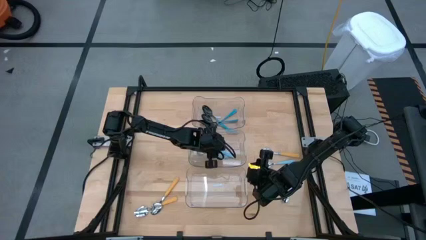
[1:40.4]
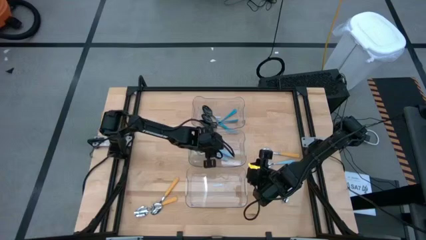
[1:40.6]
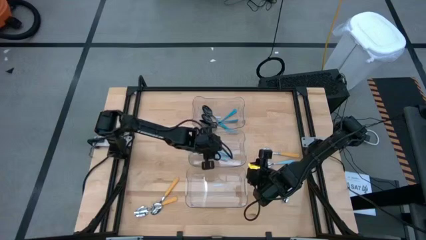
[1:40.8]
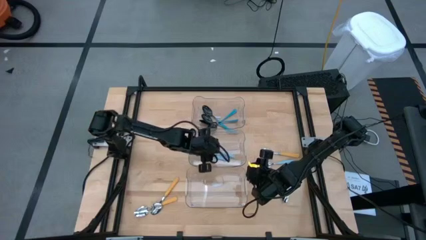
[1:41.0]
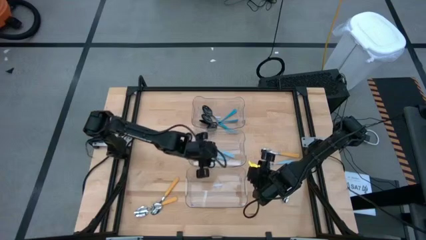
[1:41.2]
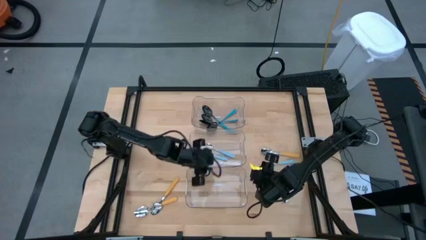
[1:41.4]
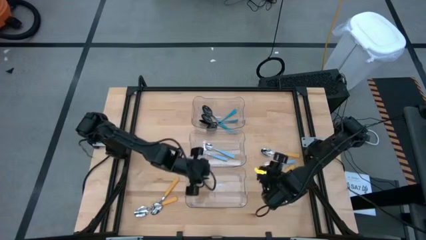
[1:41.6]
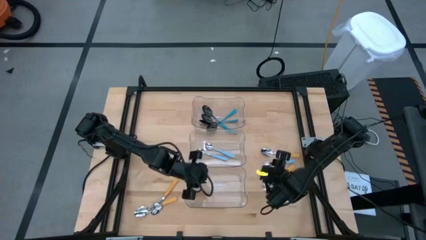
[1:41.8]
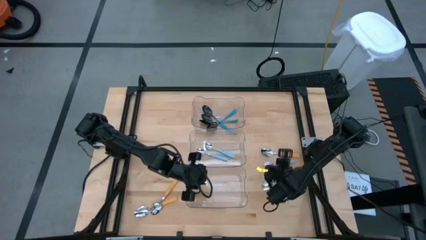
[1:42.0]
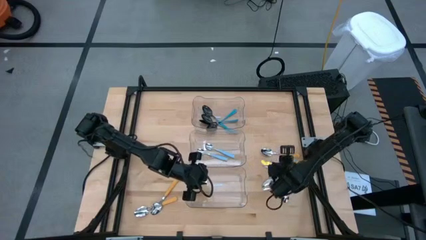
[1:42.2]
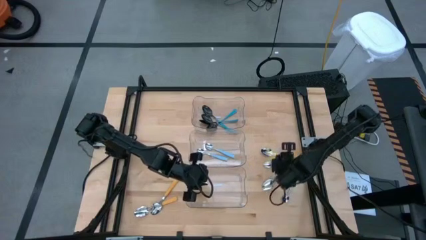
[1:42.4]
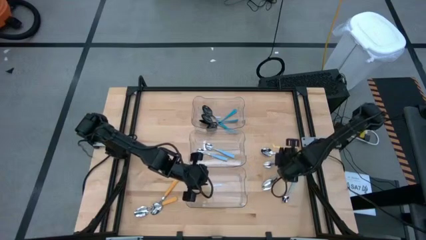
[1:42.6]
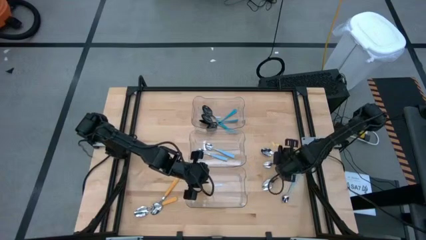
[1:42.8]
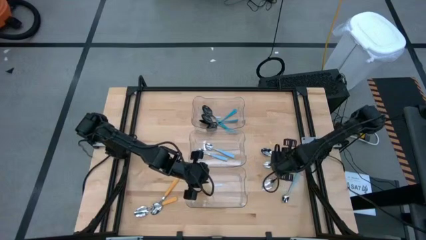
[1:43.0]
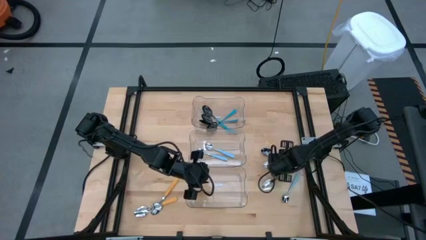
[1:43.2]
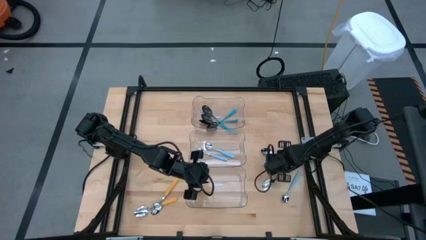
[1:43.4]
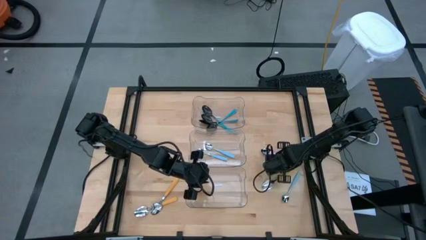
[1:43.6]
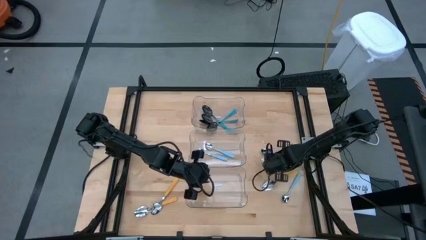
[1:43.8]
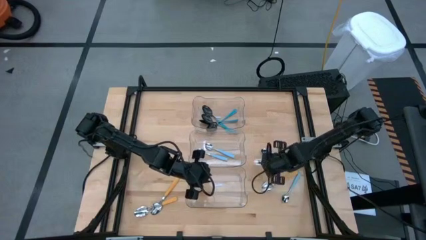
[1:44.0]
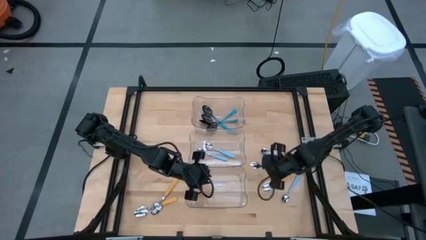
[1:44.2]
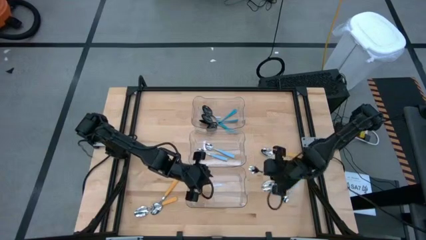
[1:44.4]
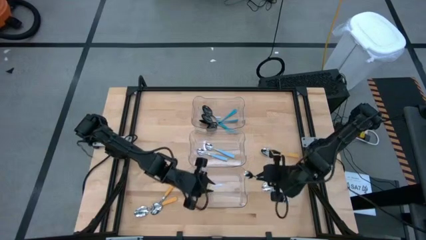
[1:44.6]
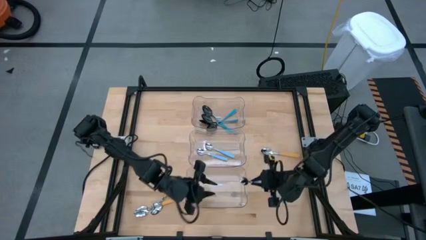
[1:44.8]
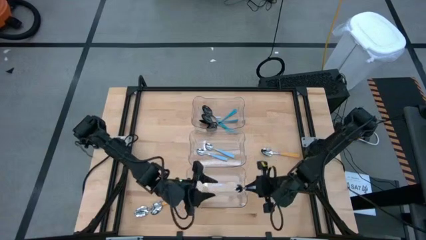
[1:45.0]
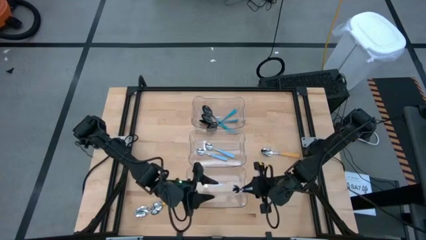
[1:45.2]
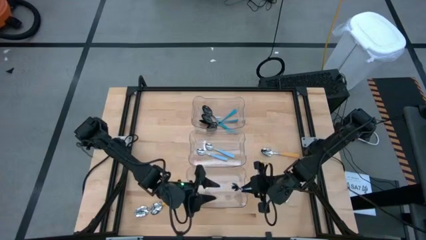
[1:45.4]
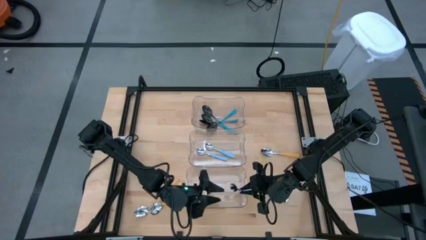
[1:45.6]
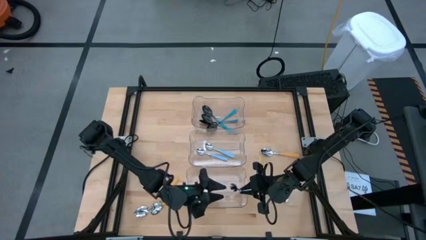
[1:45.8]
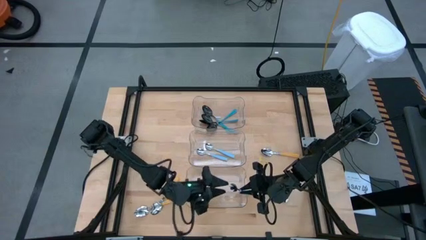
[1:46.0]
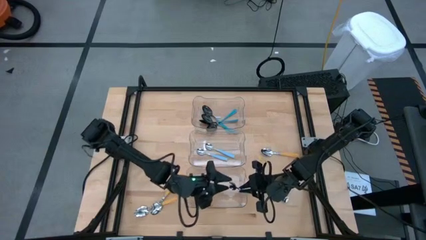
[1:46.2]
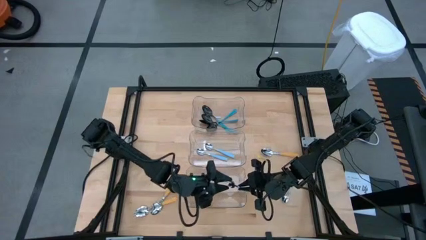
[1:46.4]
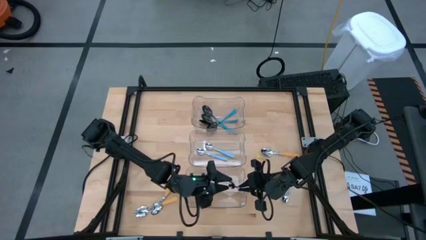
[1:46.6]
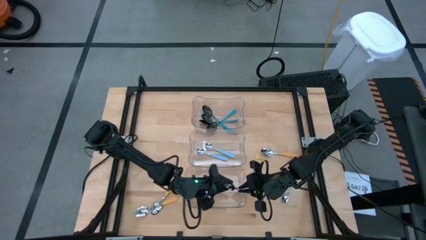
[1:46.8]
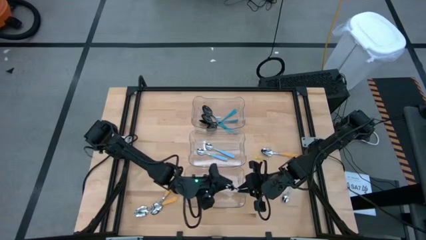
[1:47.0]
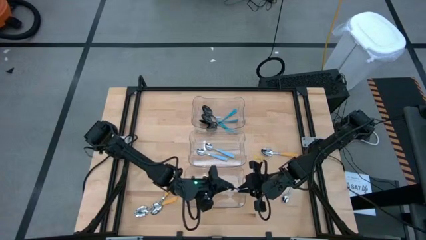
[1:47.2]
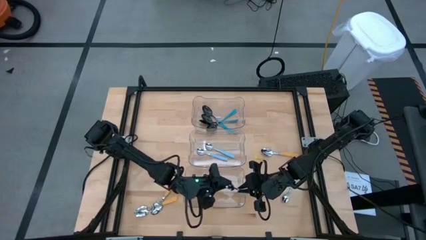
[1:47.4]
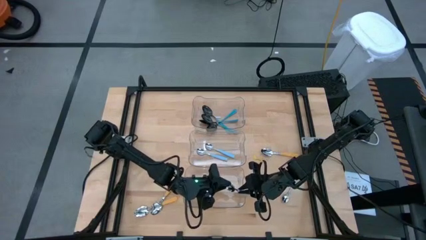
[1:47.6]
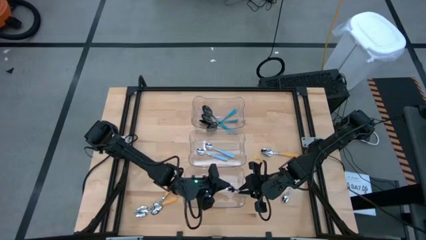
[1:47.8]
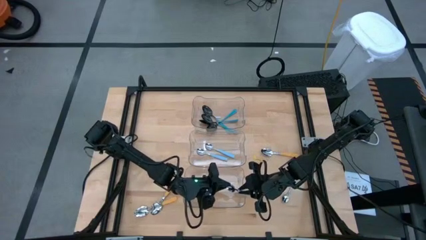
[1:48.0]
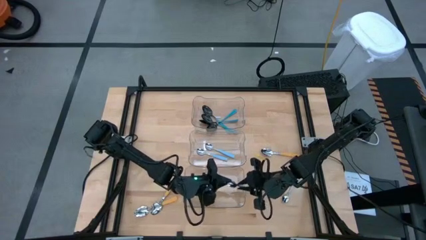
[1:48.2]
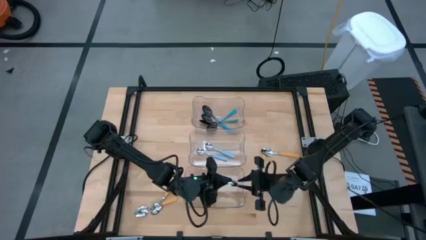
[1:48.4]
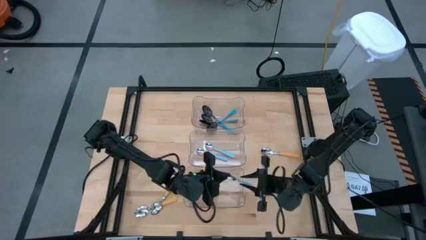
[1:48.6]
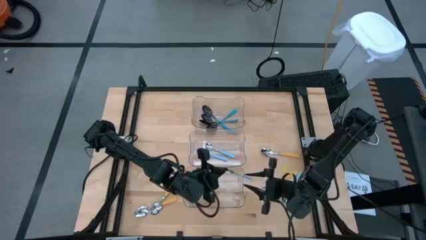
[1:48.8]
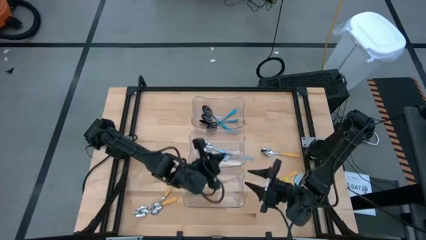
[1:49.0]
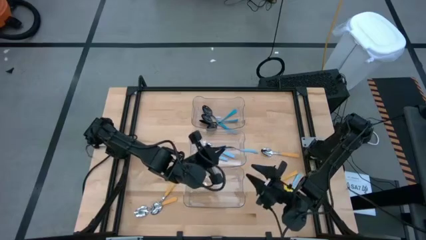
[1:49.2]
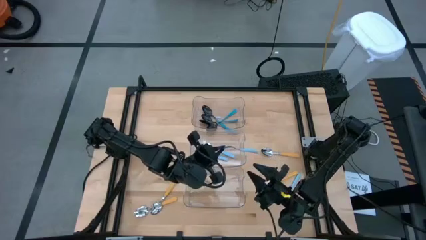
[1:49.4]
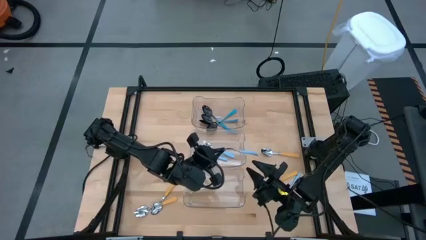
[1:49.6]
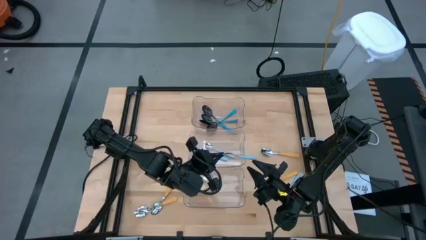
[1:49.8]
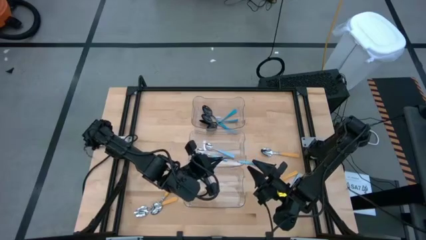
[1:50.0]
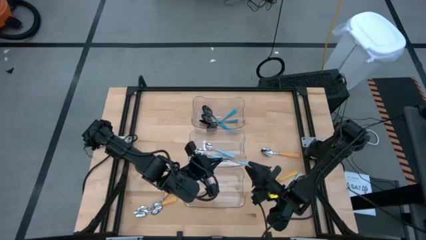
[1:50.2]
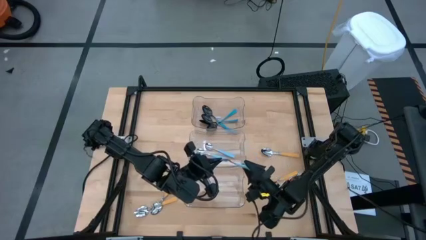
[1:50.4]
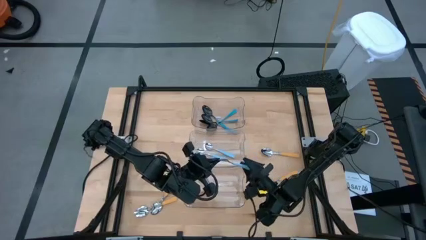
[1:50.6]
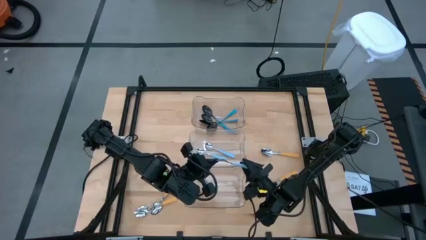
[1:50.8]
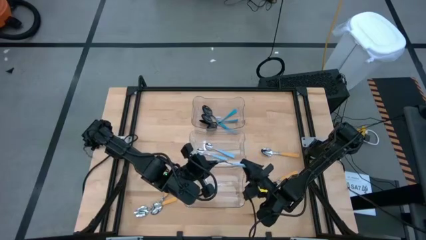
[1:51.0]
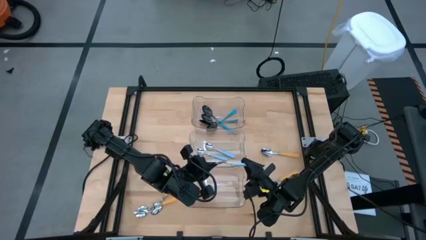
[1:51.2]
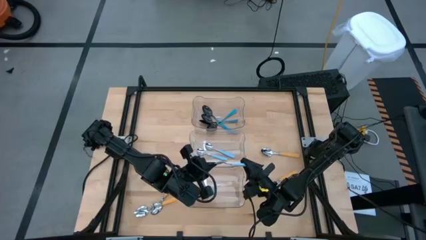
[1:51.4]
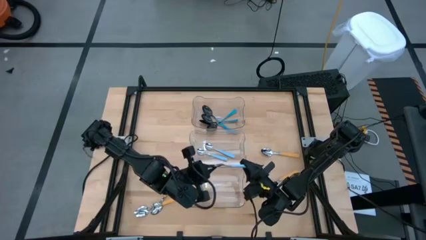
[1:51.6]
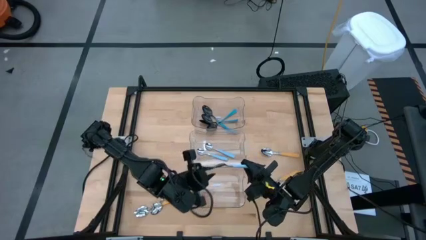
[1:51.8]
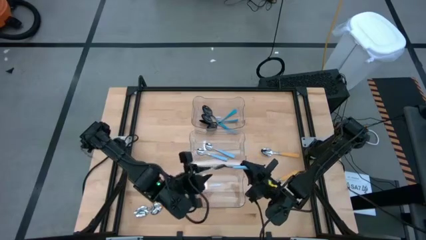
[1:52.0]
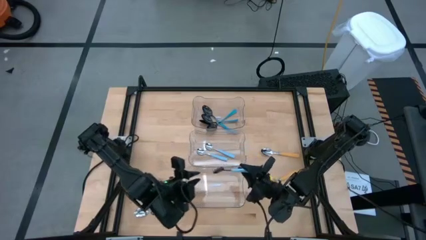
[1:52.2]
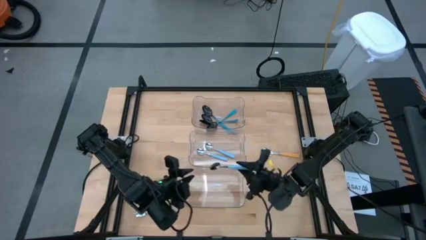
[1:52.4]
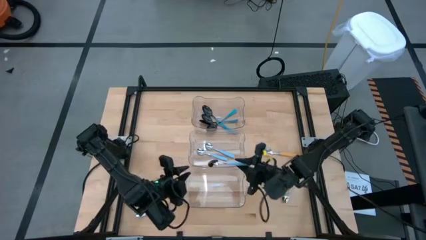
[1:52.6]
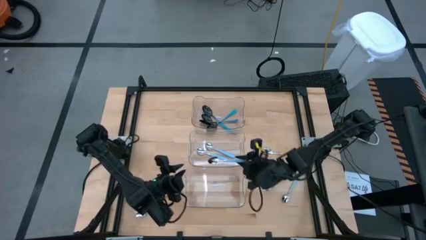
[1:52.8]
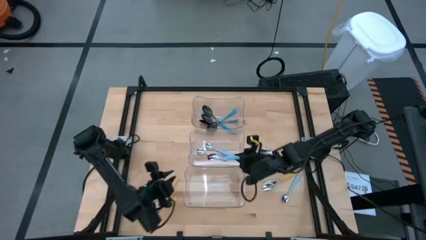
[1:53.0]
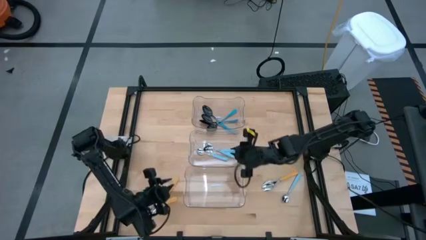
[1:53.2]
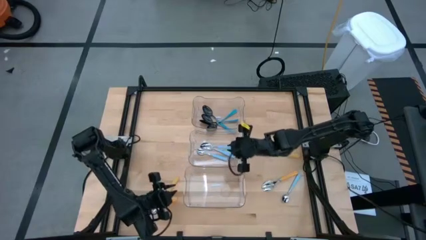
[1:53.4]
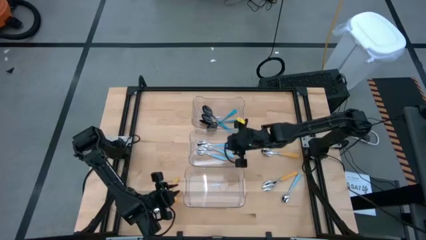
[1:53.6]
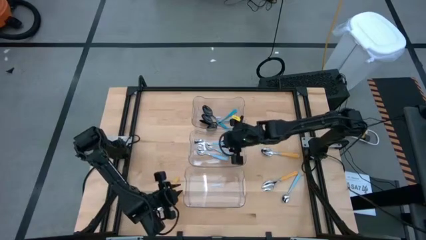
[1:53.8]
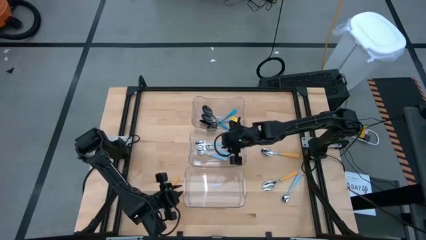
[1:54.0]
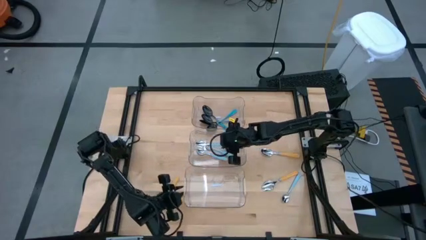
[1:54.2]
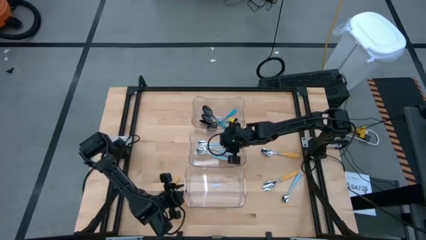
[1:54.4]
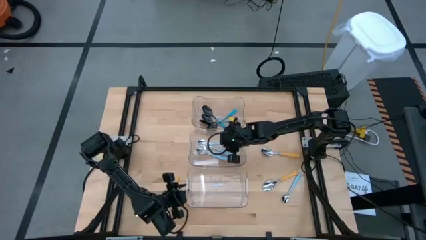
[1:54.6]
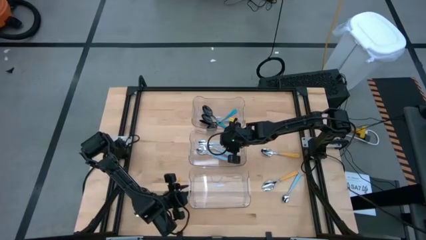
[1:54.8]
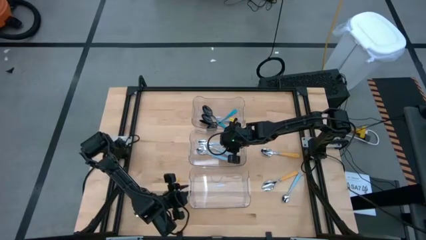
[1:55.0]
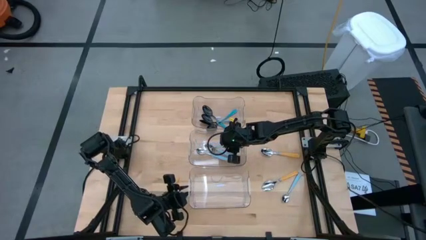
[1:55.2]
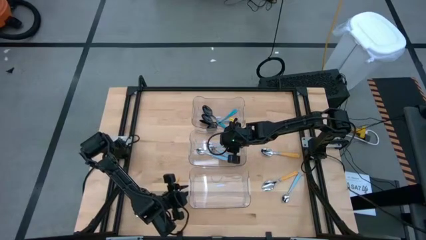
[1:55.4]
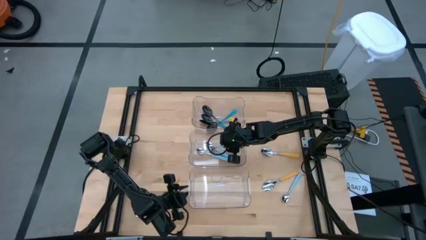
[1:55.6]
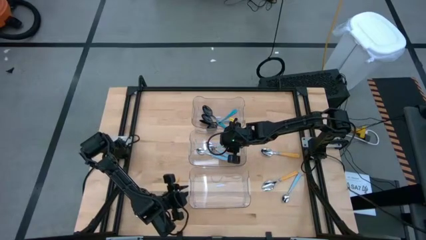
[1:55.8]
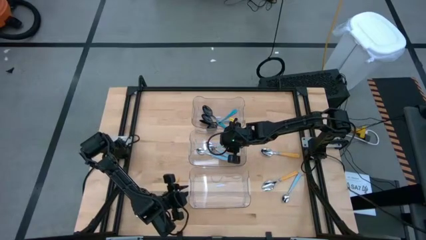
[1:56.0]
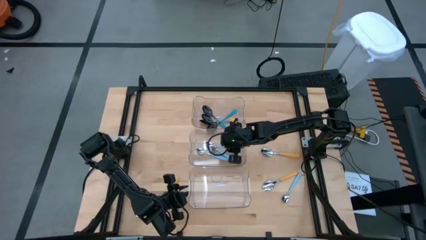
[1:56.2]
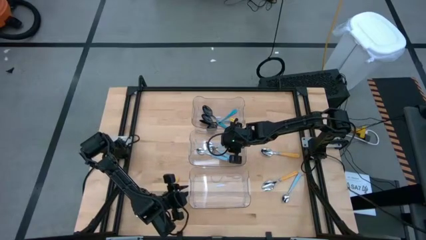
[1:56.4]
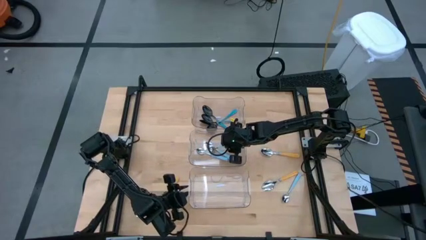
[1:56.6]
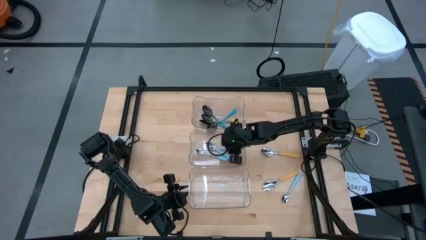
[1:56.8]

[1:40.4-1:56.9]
Task: Sort silverware by color (type)
Put the light blue spoon into the middle transparent bin
